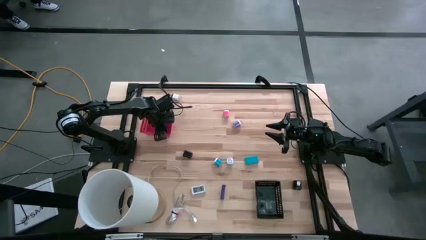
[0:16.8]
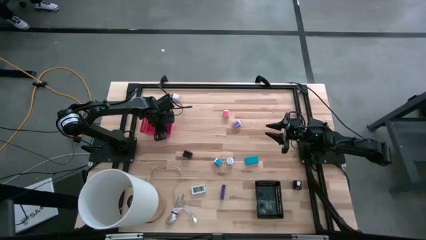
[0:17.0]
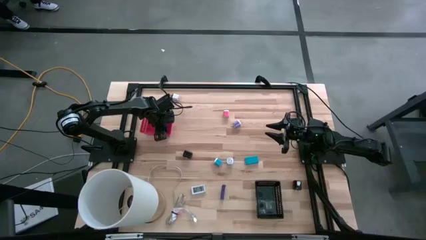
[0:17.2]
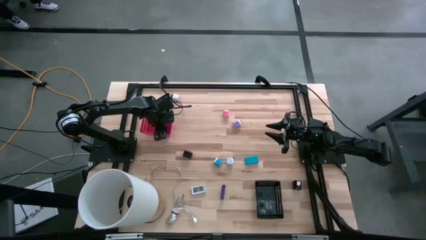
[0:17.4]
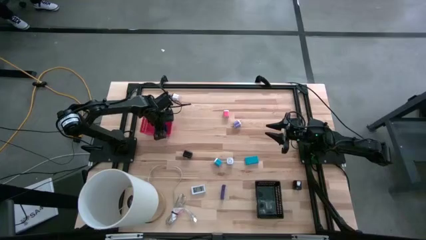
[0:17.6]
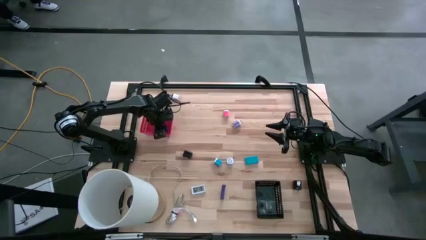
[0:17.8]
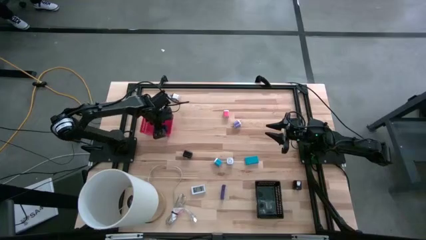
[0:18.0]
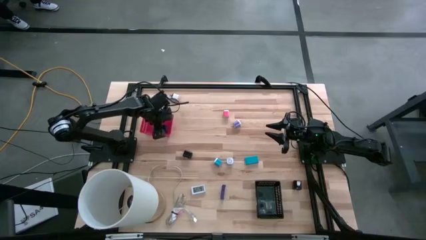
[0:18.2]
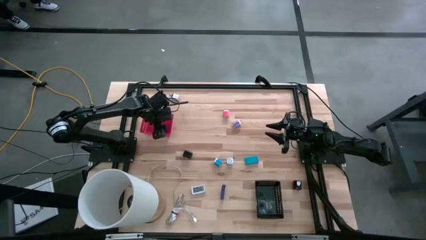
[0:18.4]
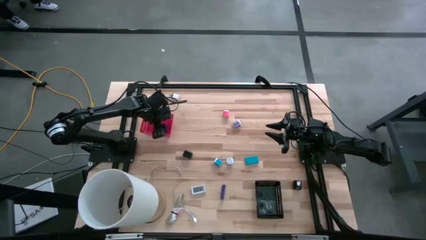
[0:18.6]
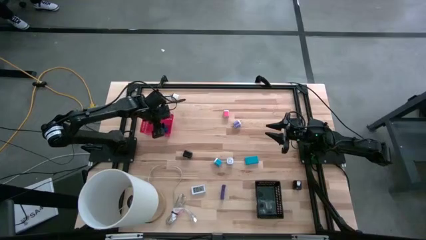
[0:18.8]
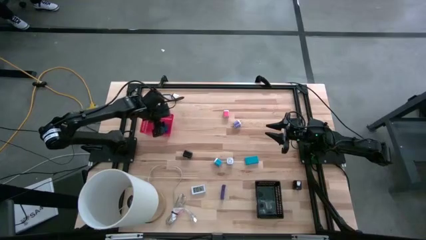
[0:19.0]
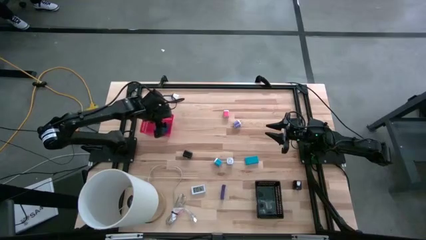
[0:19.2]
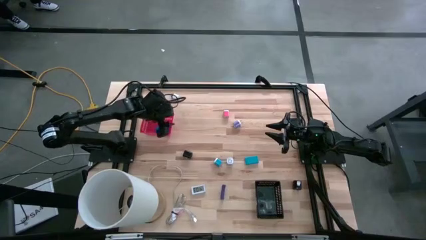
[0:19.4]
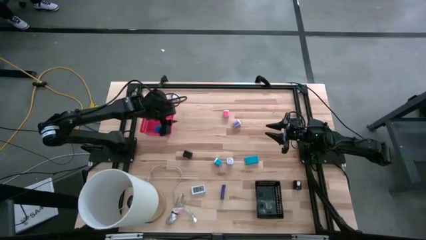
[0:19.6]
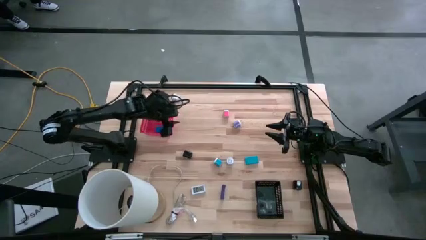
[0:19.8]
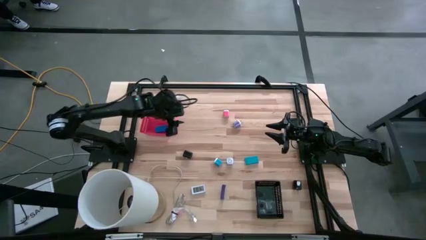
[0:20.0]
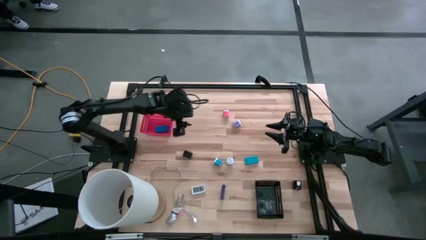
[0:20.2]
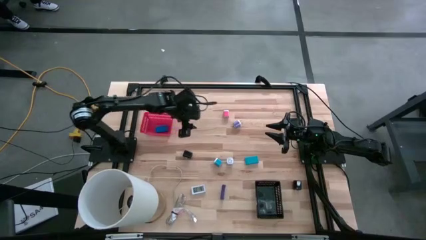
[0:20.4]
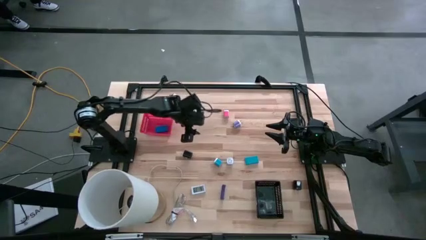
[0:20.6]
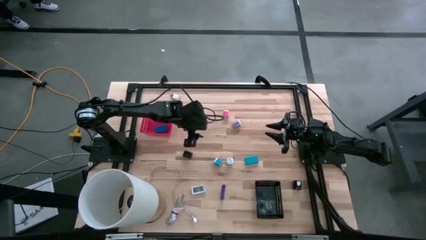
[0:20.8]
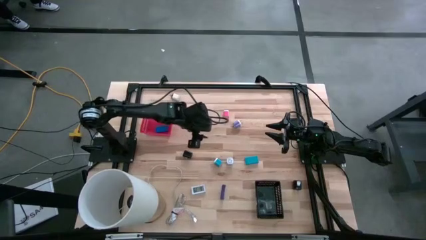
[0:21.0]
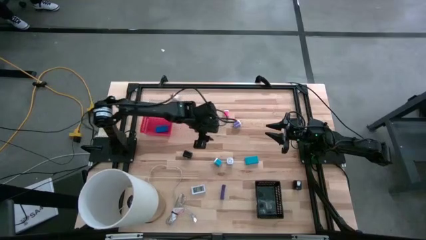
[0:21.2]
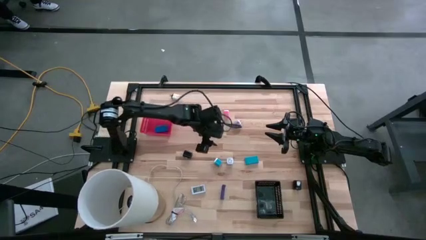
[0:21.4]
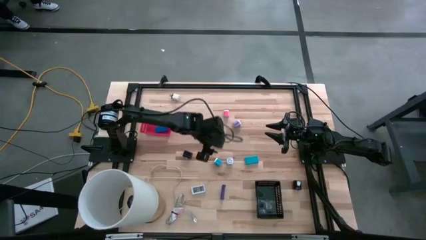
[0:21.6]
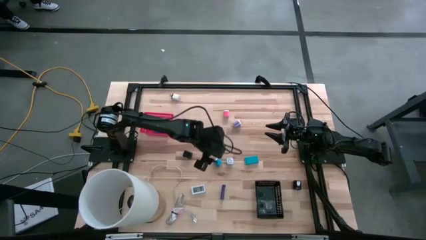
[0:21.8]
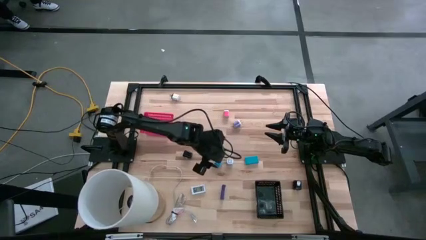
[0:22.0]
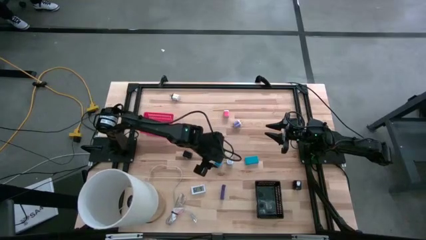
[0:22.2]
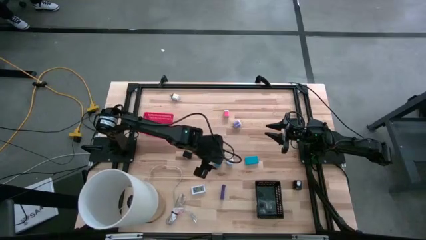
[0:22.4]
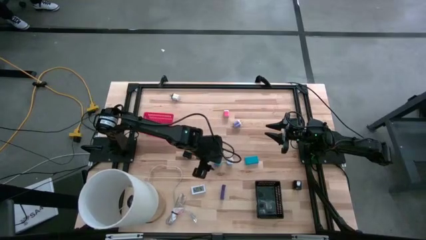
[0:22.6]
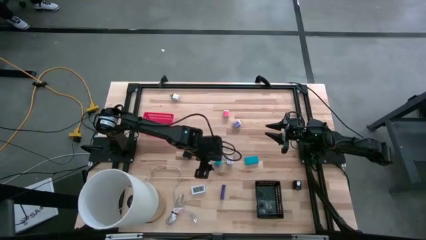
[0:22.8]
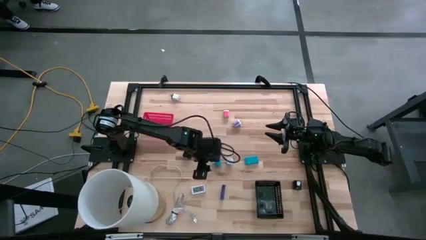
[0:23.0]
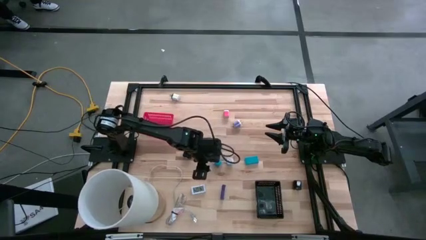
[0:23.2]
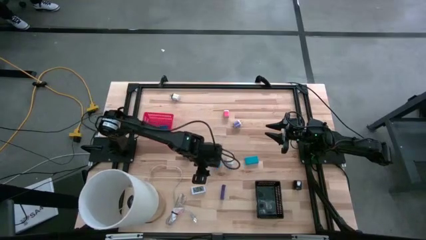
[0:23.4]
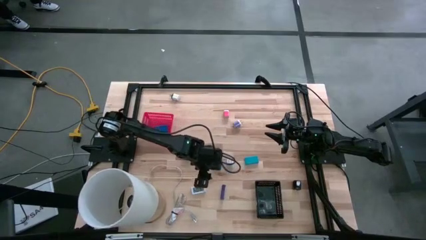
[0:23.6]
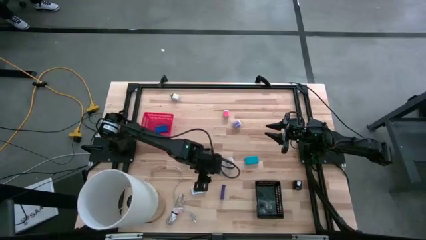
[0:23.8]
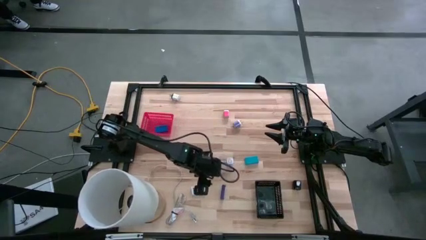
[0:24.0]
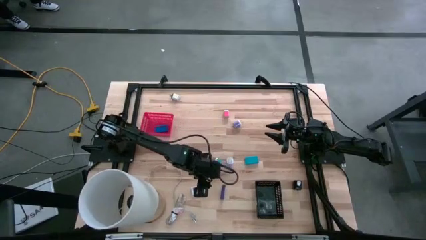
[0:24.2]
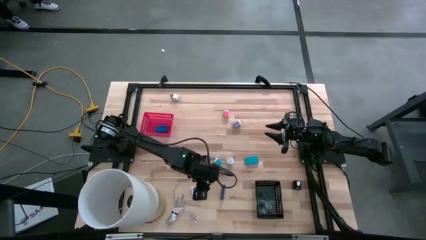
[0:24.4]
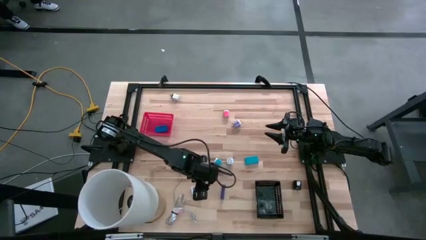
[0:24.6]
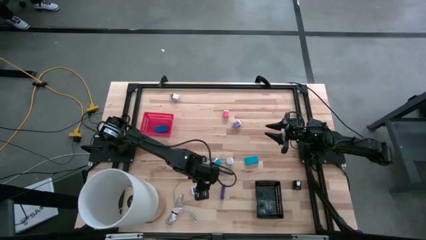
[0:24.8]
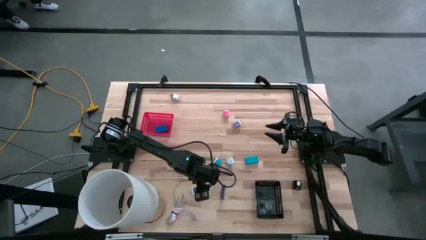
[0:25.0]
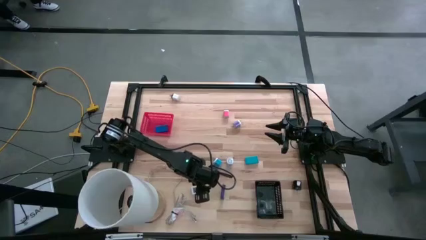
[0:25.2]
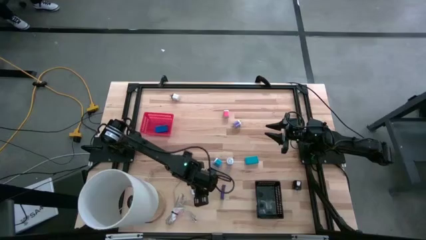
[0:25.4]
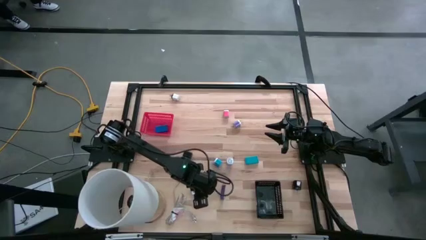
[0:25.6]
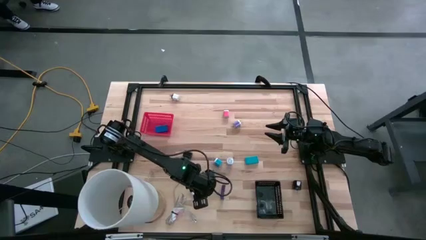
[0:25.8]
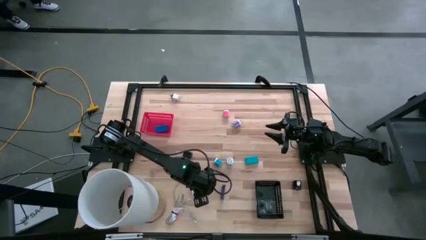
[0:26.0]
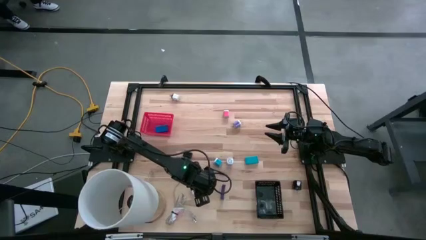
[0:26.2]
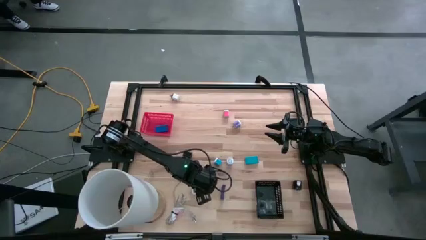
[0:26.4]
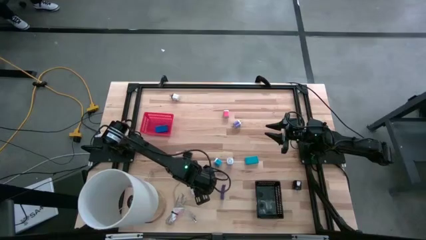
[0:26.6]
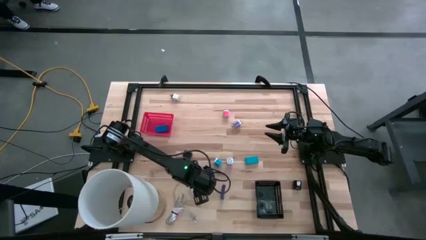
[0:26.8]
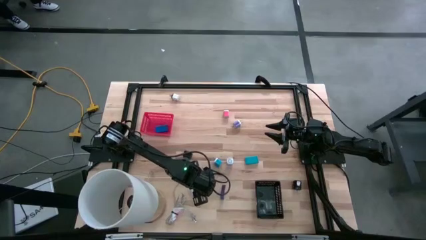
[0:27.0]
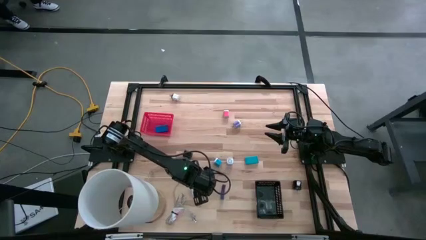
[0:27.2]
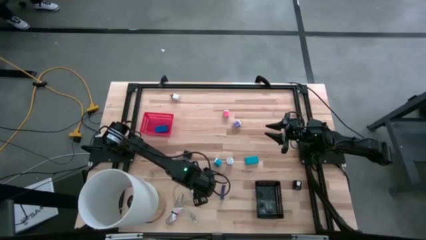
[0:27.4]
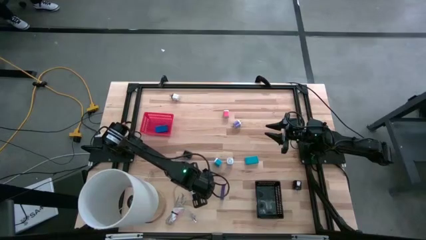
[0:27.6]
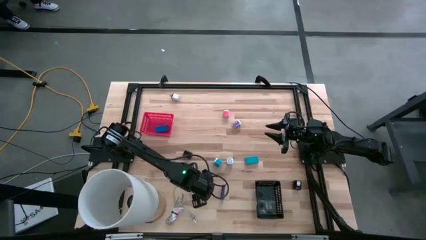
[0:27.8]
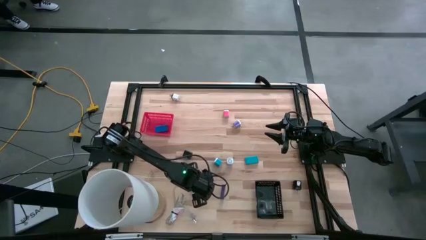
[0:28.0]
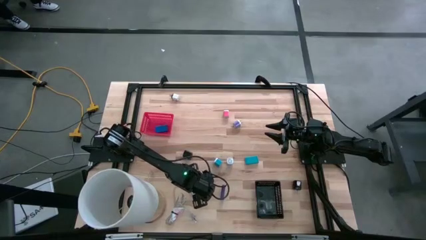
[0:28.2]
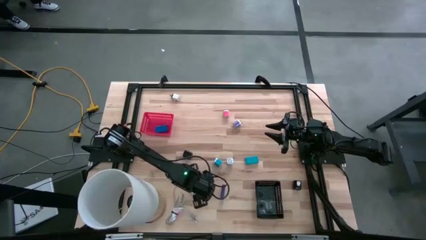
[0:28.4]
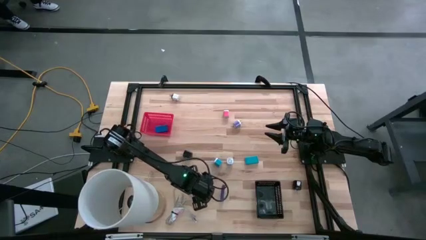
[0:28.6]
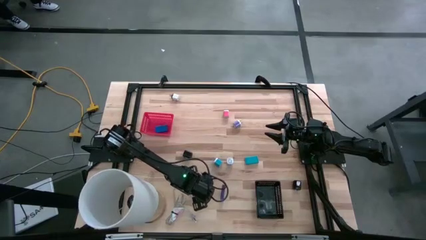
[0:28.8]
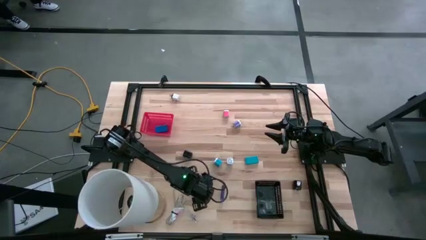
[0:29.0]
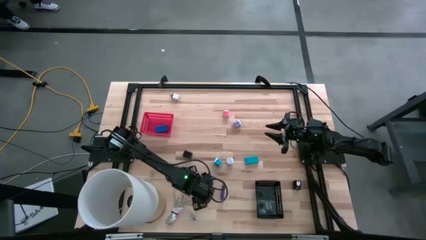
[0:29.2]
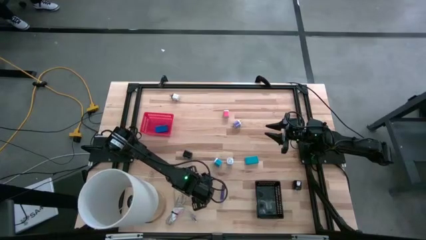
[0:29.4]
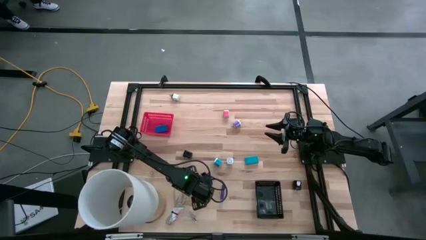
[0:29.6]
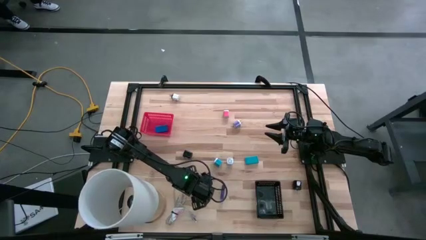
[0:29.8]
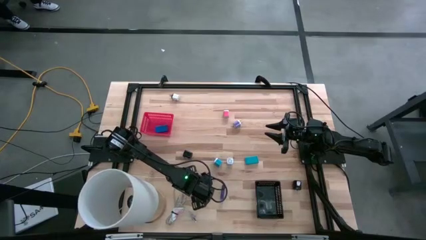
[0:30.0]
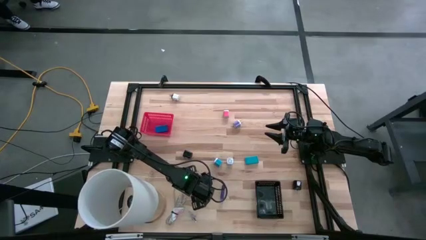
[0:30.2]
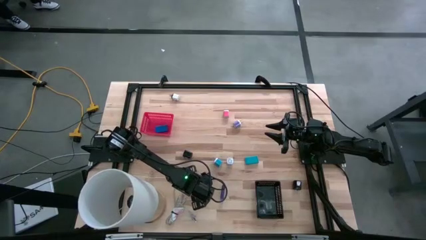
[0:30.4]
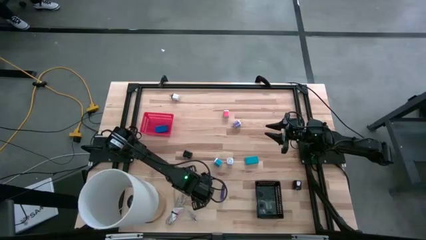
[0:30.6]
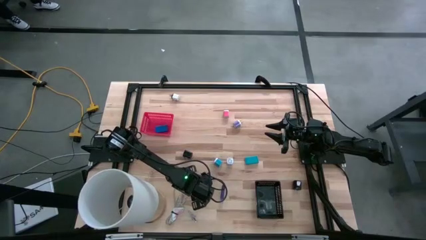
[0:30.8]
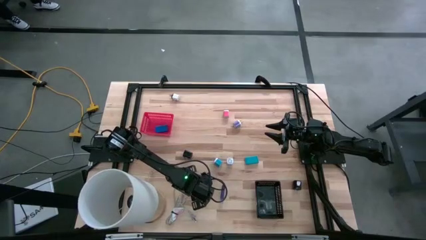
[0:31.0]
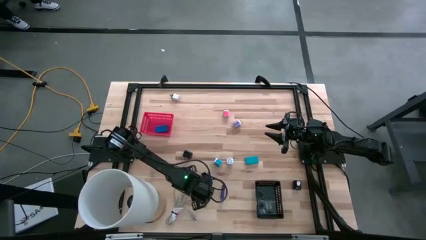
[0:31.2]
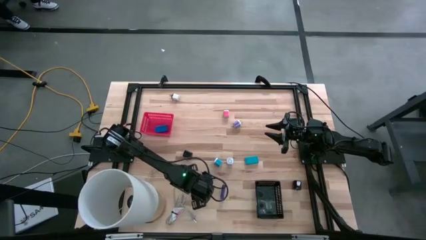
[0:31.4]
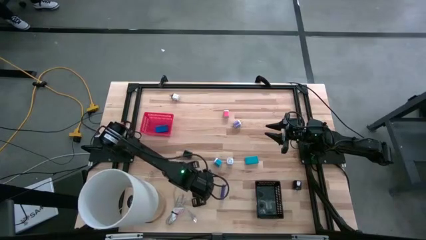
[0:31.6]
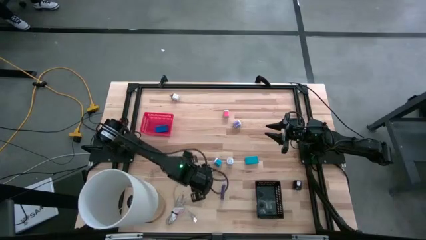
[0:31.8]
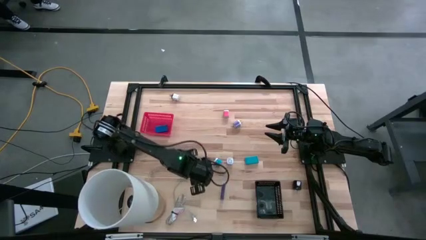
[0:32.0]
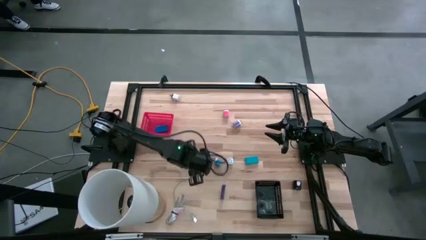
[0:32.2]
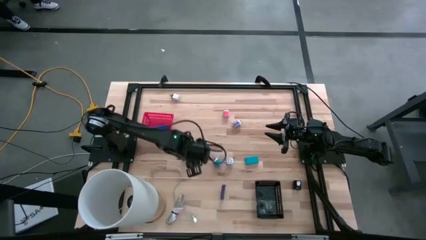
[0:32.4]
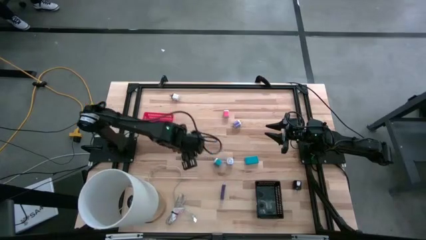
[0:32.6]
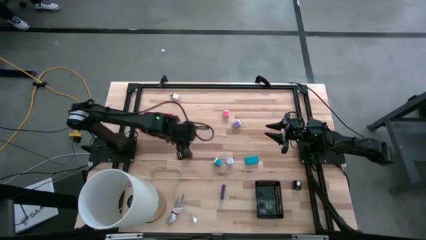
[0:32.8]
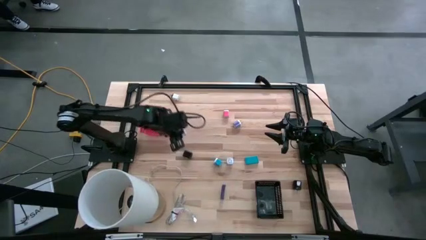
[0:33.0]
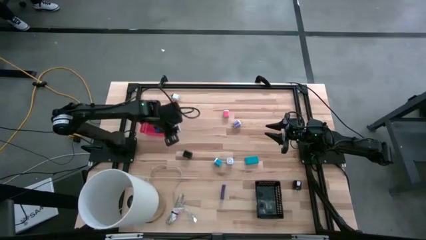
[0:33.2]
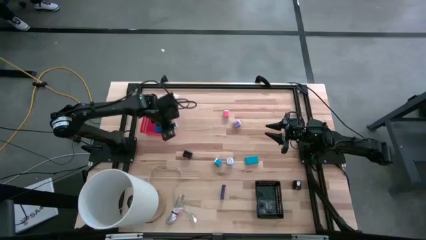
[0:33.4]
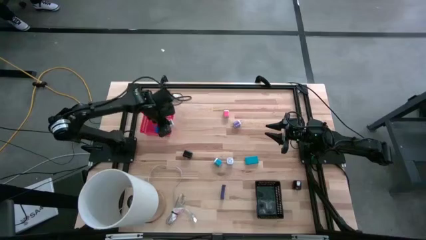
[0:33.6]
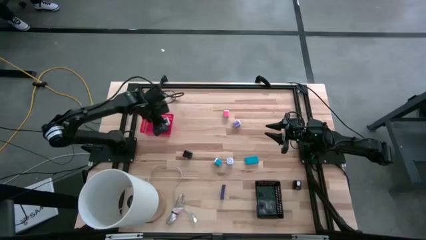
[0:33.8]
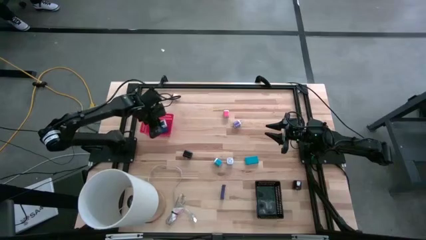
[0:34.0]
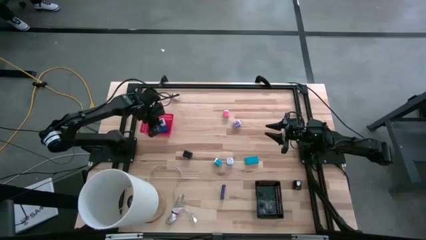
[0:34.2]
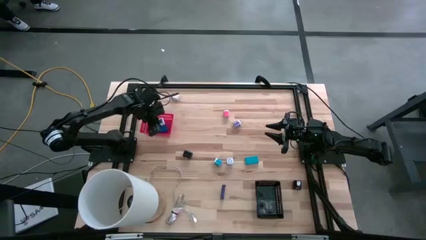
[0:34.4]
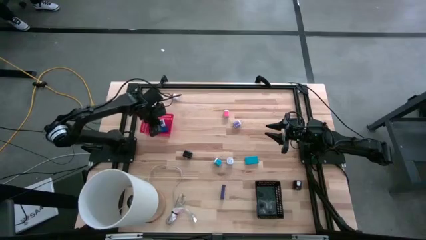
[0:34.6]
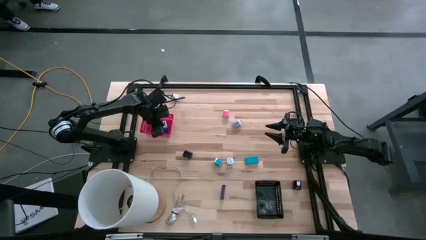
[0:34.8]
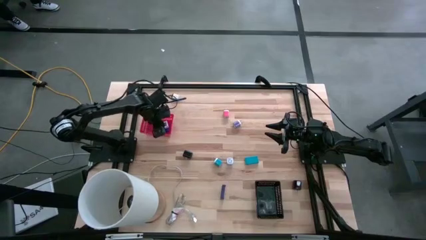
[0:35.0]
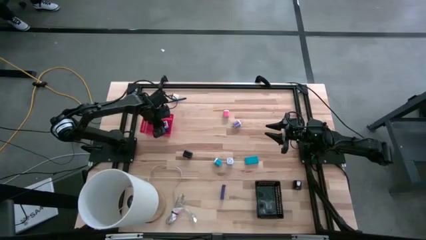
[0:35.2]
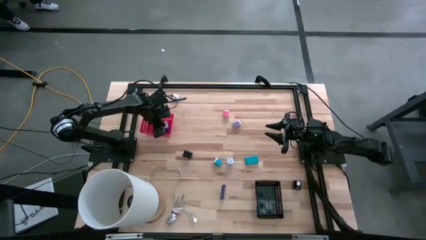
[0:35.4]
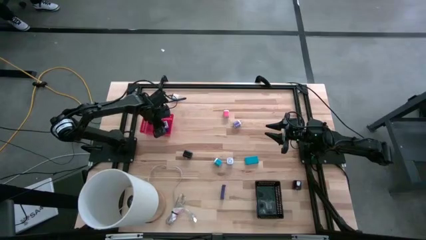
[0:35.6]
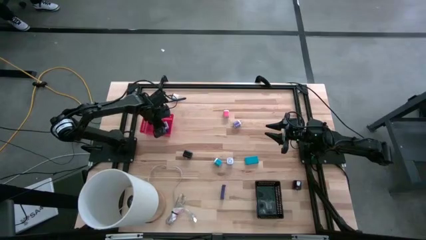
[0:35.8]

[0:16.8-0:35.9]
Task: Pick & Place Office items
Put the white digital clock into the red bin
